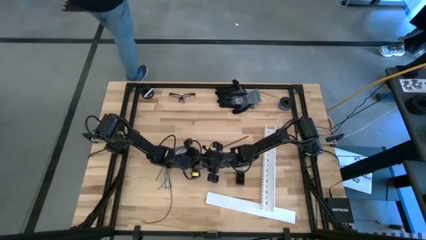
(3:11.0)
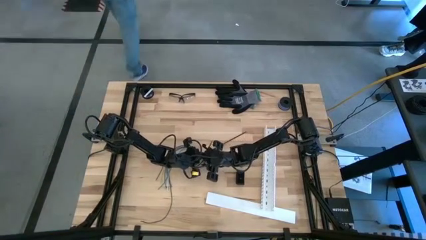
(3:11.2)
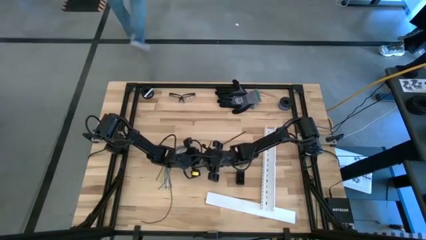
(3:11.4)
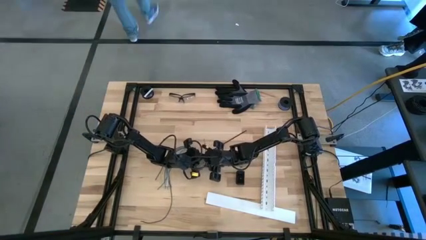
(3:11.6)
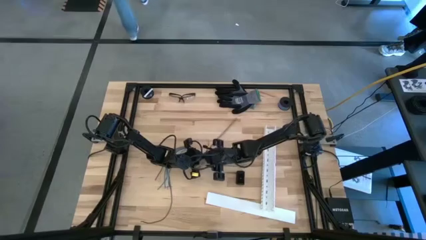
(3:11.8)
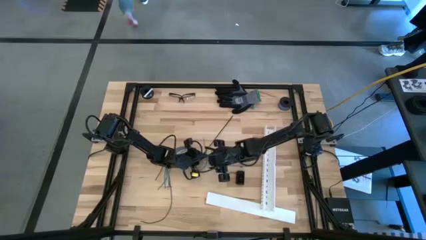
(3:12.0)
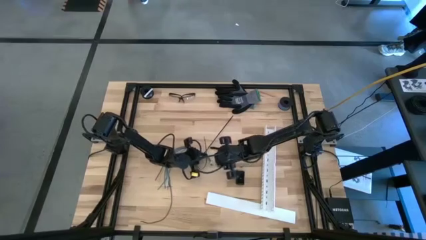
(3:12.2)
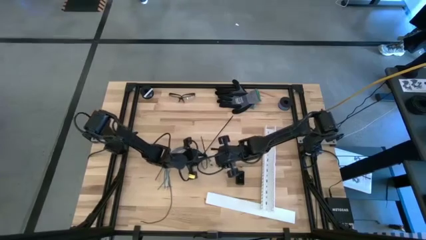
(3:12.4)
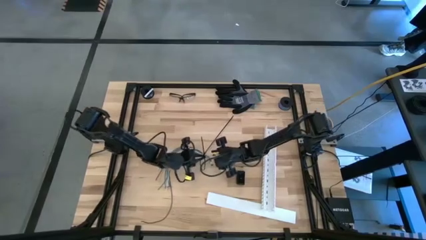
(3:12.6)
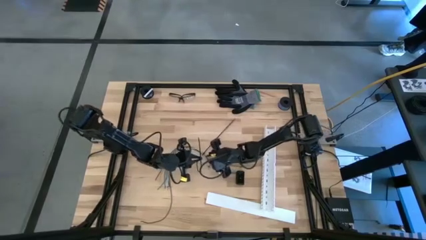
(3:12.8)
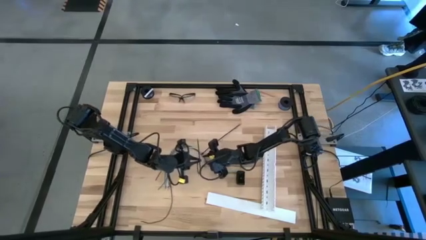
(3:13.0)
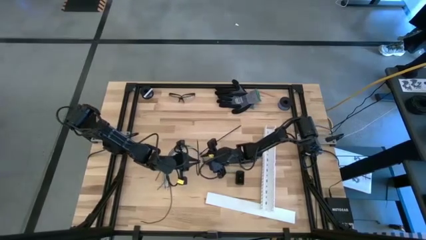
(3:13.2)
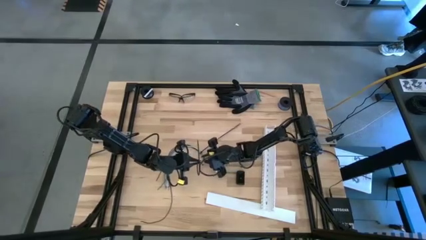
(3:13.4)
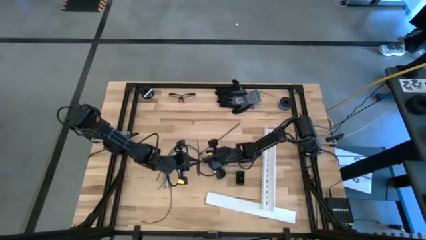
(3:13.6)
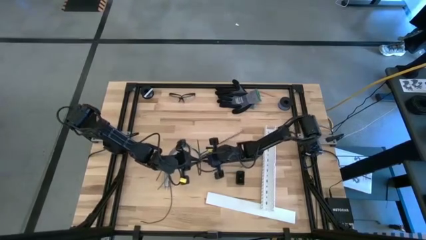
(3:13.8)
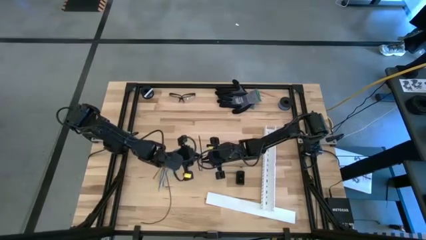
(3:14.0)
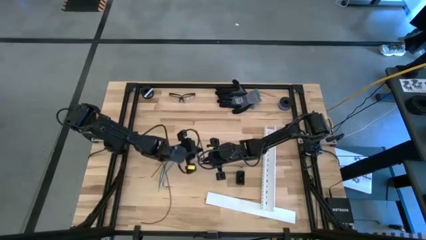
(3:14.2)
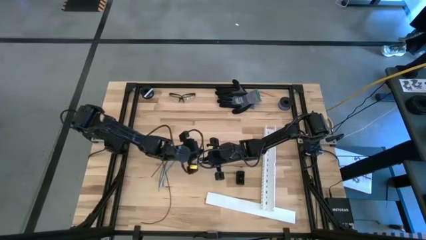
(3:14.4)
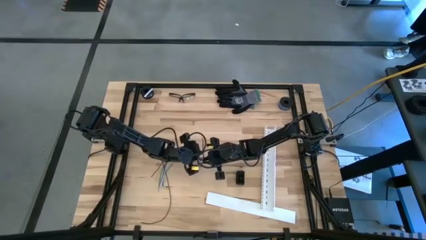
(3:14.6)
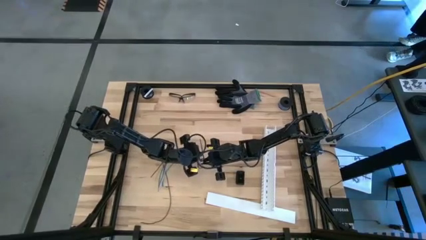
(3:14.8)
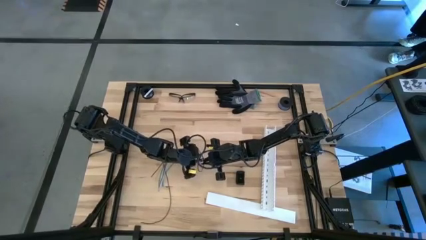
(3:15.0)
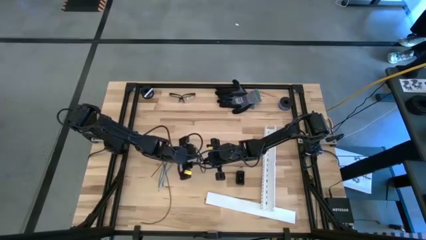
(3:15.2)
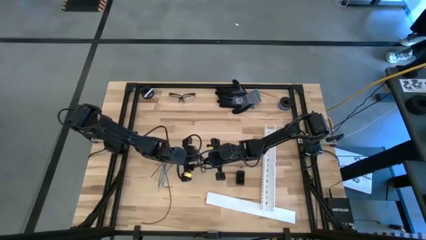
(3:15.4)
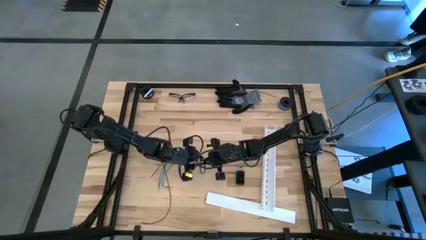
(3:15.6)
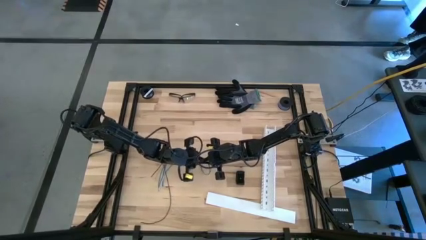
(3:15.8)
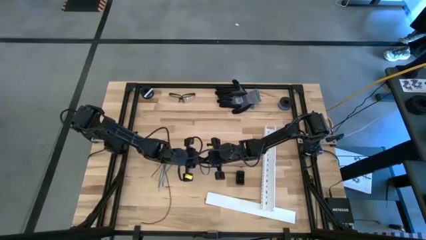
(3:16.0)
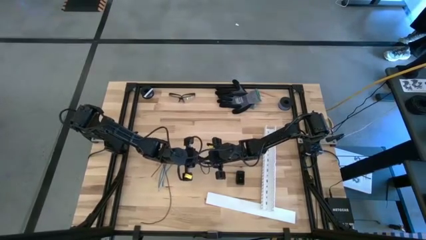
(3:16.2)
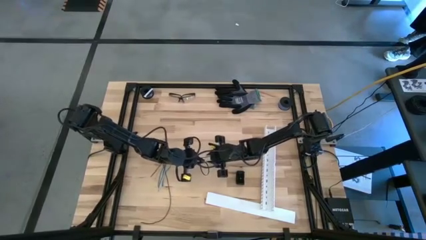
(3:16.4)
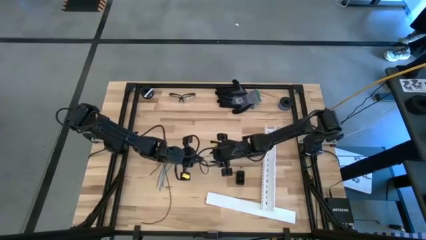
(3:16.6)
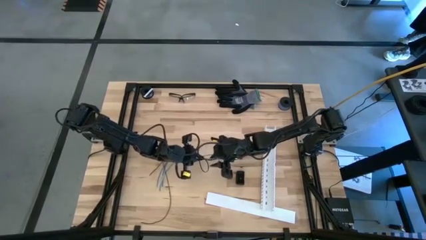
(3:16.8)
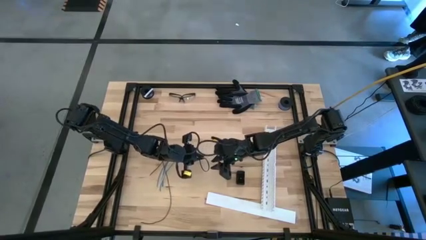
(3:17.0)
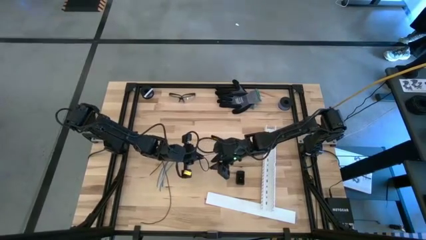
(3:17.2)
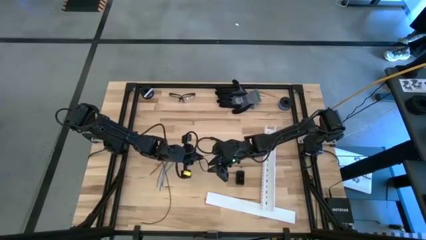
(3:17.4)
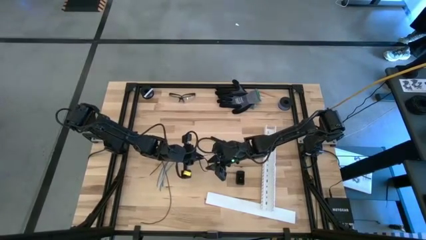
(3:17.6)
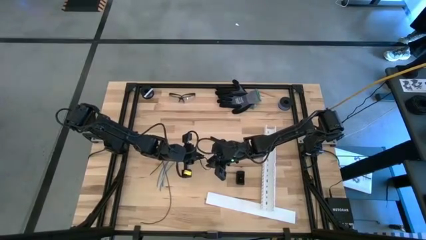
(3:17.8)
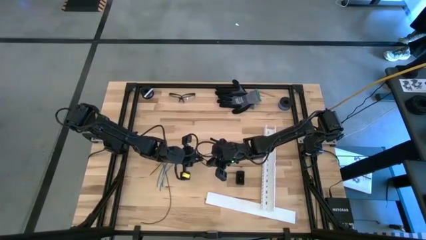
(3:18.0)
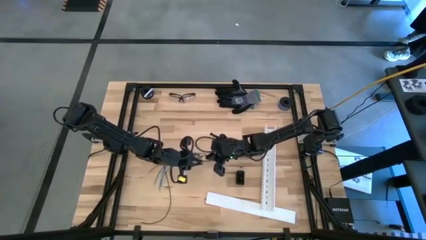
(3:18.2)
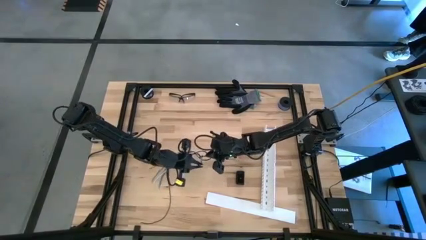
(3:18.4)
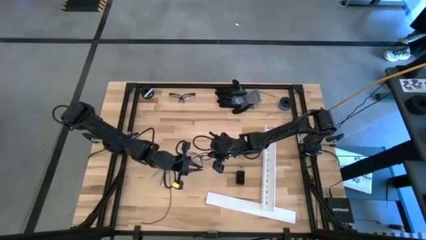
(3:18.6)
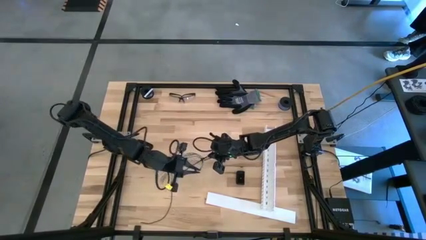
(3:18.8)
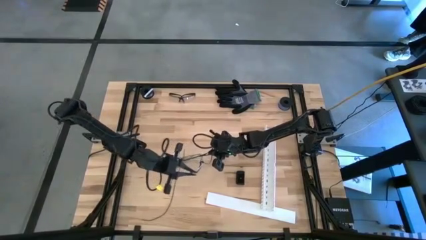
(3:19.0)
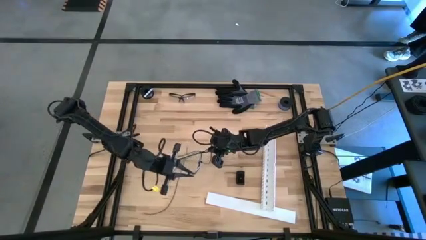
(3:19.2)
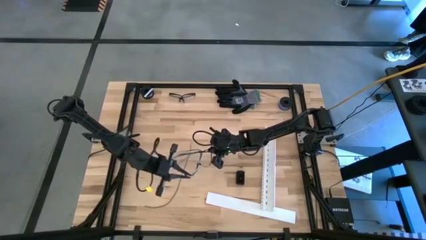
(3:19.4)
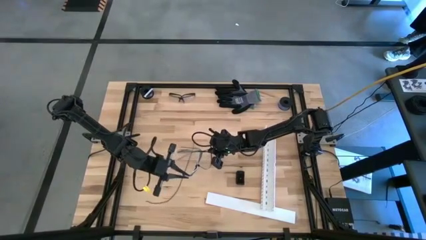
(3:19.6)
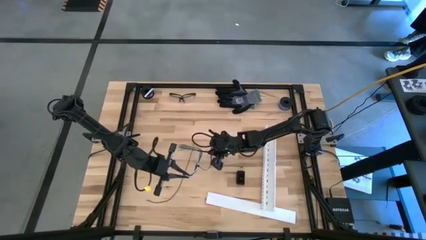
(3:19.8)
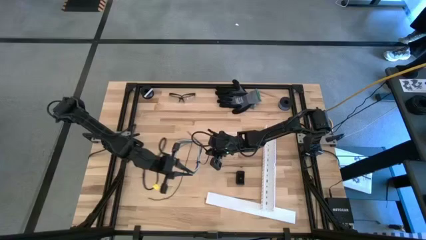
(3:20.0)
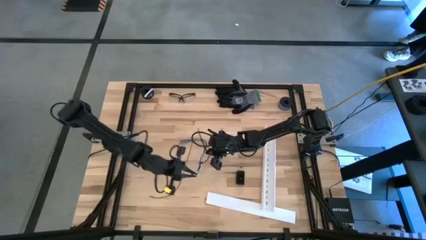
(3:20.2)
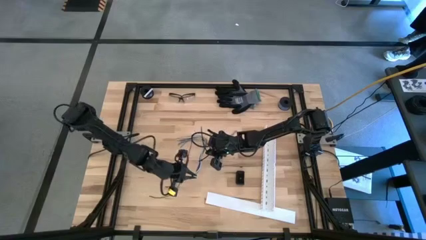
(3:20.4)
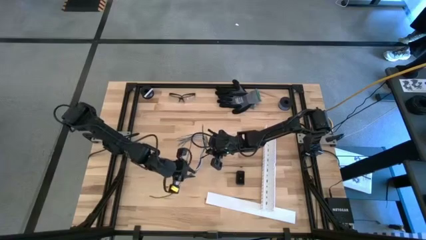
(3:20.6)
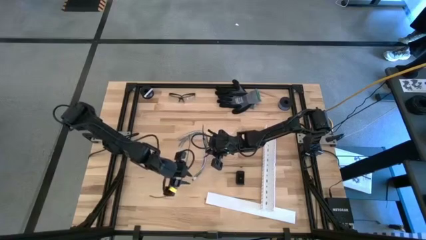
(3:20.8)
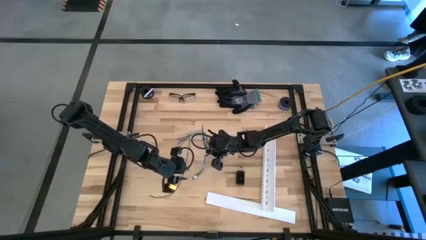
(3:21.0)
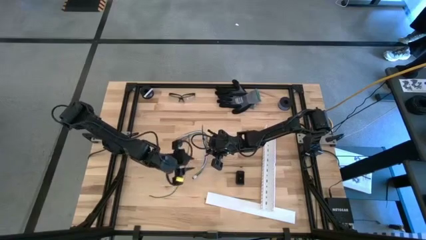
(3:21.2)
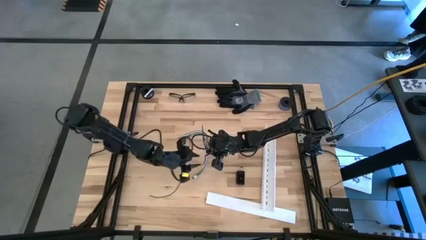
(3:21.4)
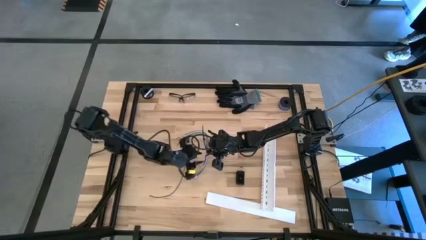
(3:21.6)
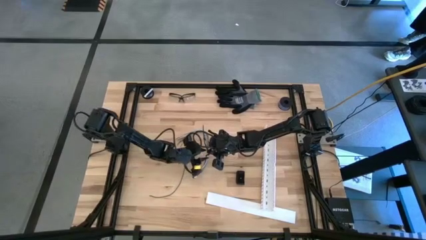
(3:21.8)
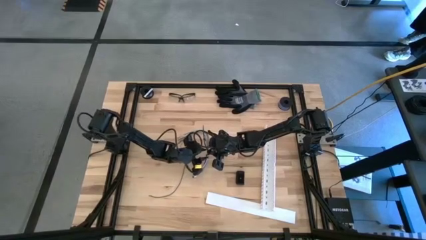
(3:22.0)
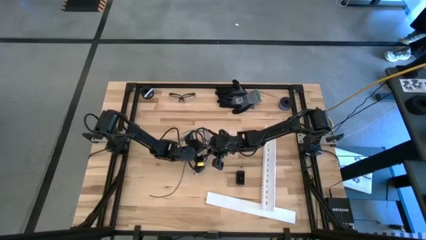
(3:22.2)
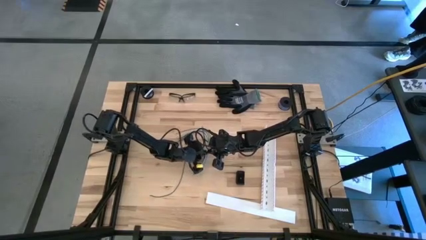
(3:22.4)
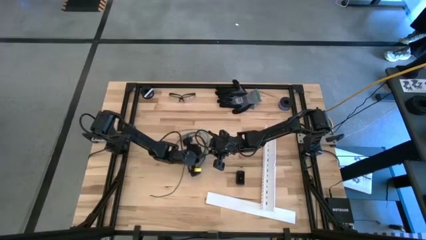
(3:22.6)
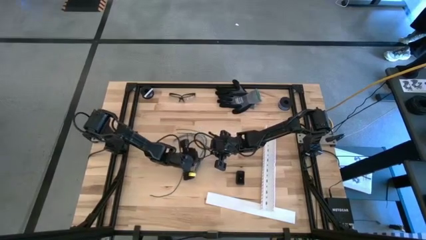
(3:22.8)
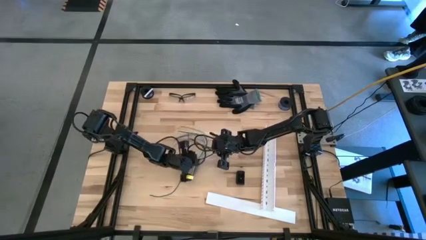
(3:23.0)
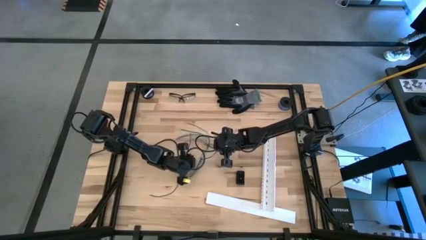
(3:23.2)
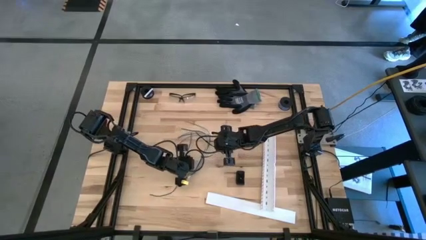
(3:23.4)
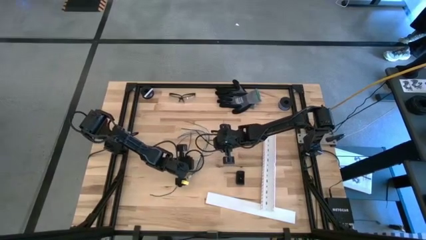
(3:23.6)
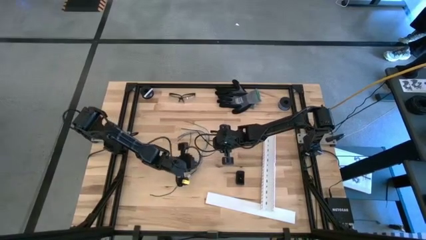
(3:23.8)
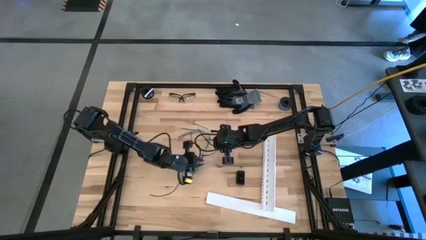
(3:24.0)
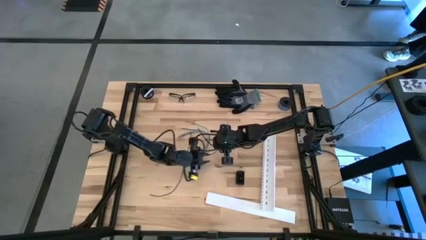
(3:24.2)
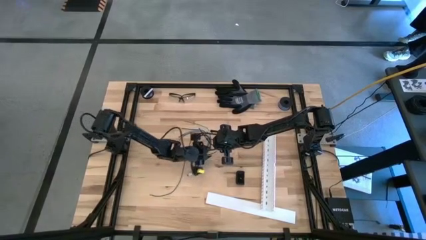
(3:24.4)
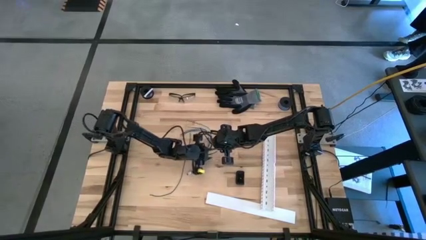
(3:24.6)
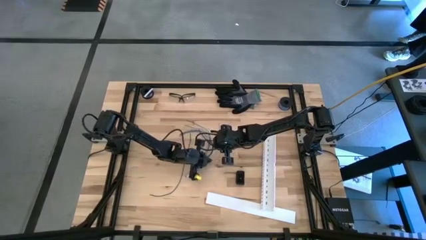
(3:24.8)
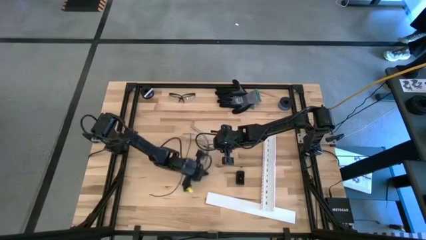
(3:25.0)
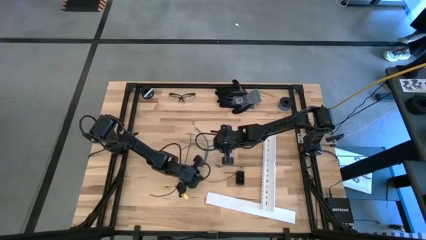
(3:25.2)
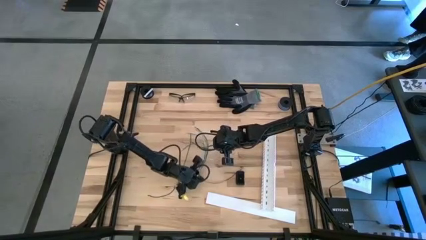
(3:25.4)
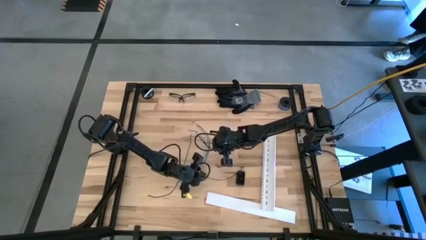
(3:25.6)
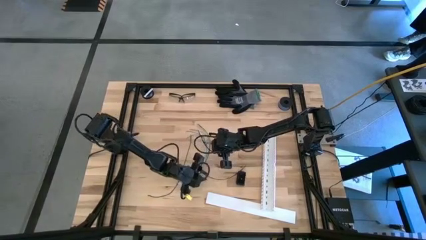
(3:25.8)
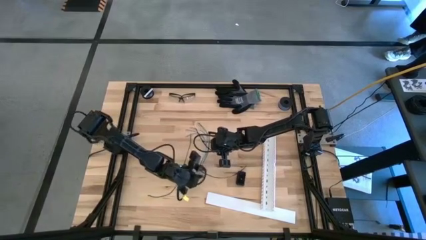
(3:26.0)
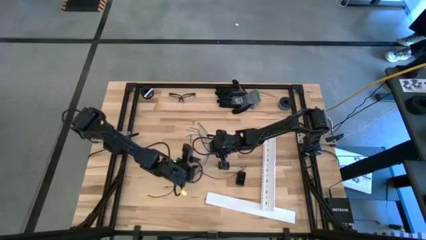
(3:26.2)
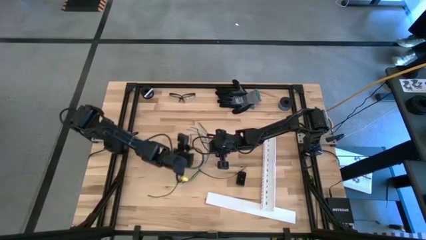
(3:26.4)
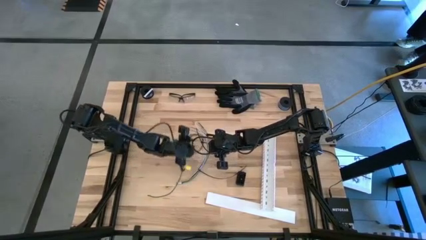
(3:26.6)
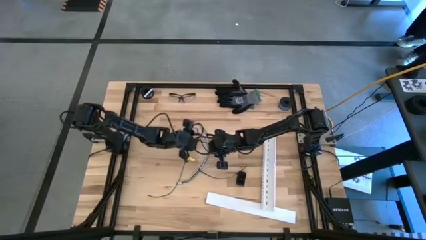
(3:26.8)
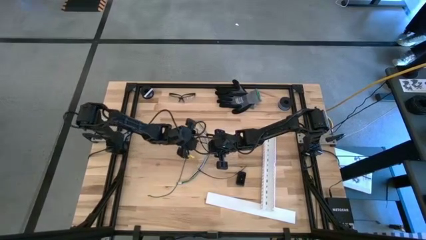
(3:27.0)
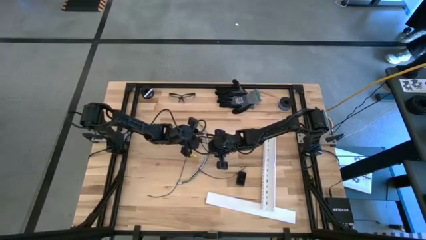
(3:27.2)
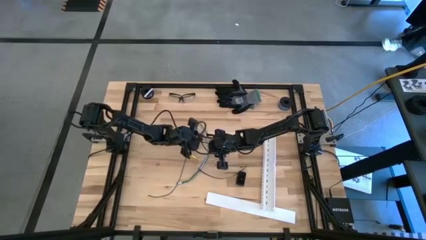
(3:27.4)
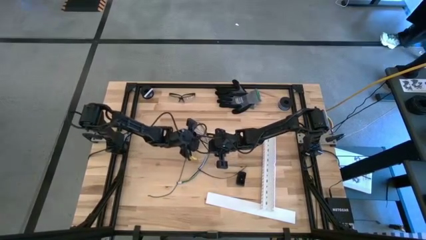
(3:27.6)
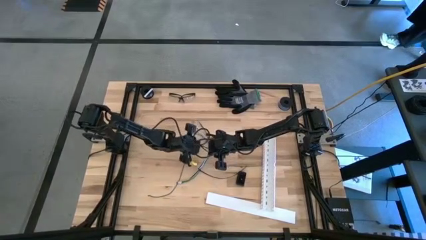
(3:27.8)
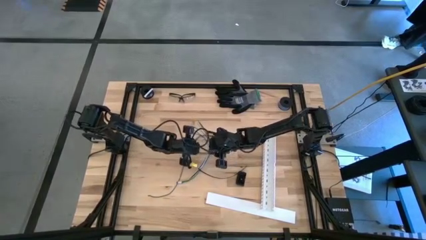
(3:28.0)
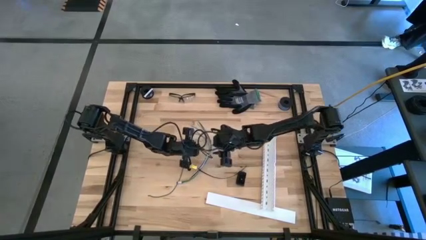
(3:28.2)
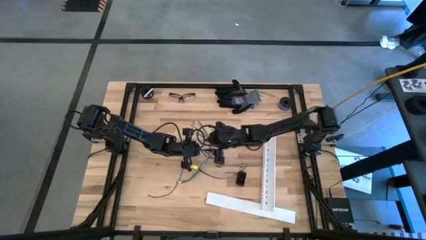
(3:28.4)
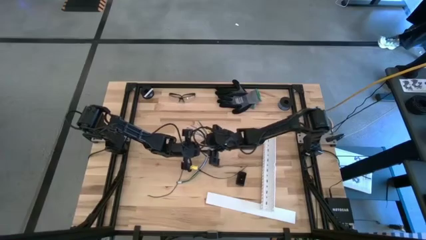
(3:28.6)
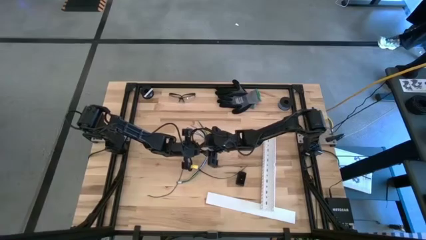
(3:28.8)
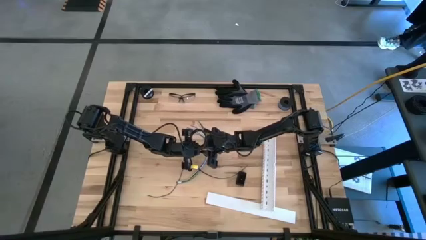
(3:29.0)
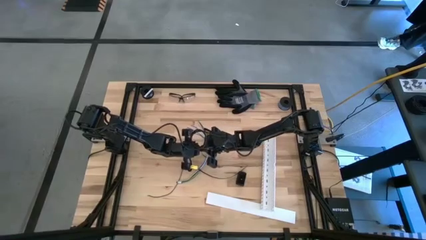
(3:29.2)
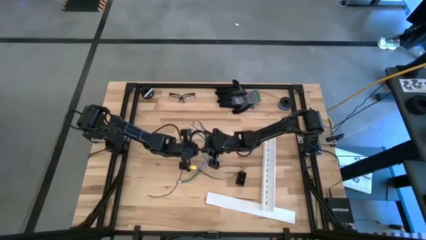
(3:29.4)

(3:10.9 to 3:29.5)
Task: Ziptie cables
Wrap the cable wires with the black zip tie
